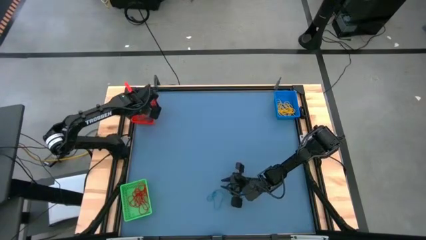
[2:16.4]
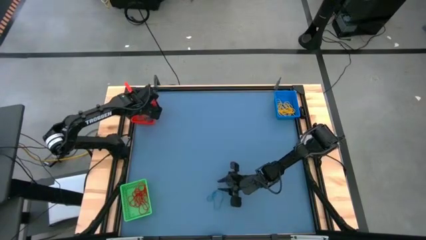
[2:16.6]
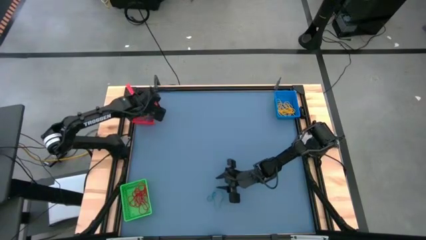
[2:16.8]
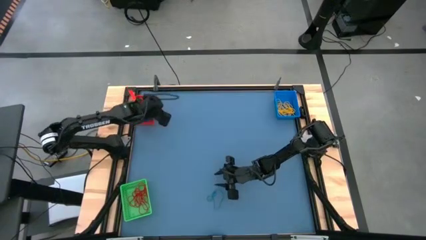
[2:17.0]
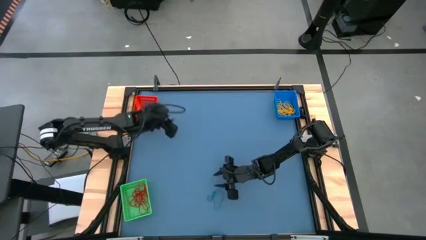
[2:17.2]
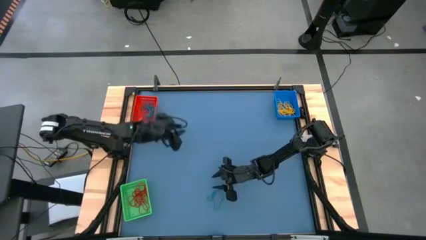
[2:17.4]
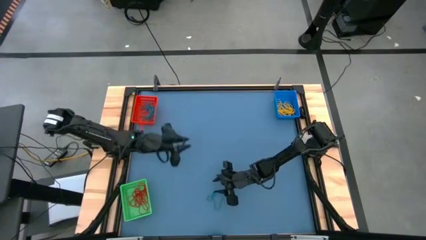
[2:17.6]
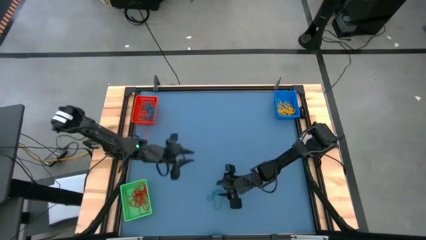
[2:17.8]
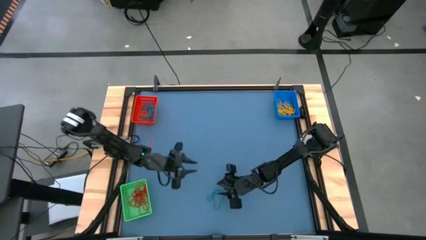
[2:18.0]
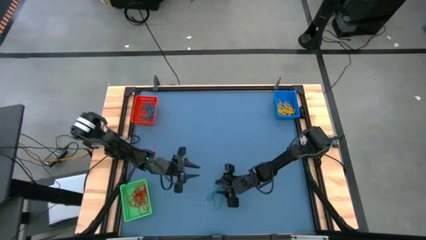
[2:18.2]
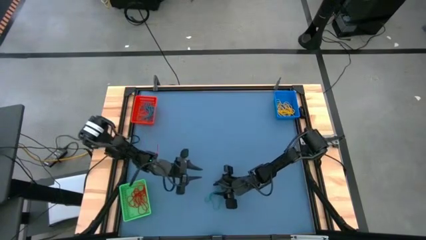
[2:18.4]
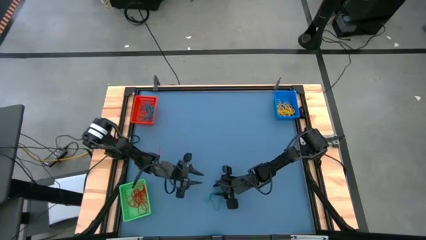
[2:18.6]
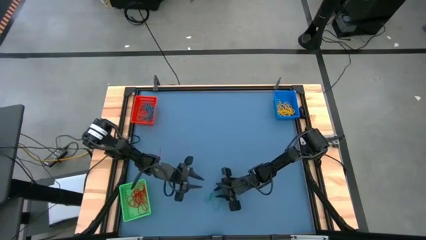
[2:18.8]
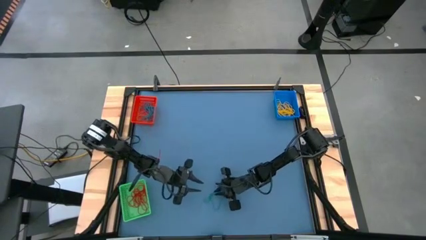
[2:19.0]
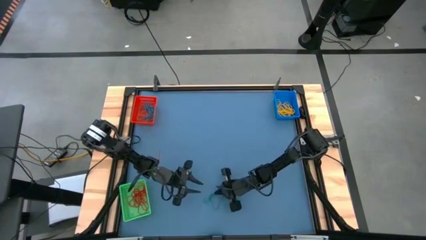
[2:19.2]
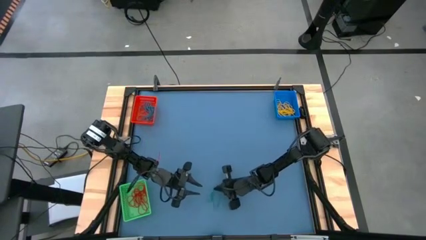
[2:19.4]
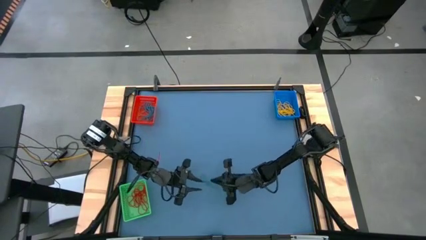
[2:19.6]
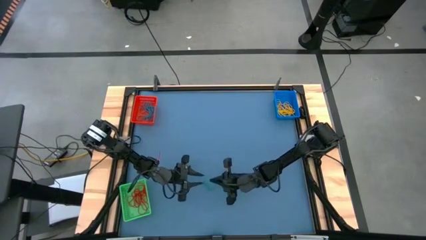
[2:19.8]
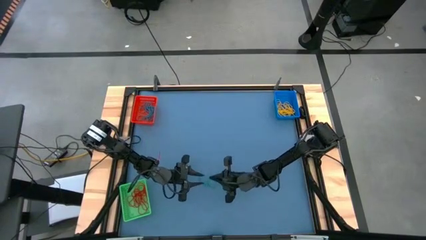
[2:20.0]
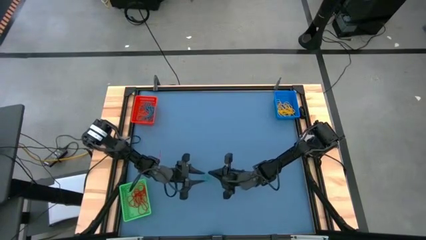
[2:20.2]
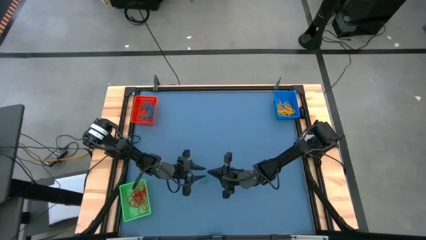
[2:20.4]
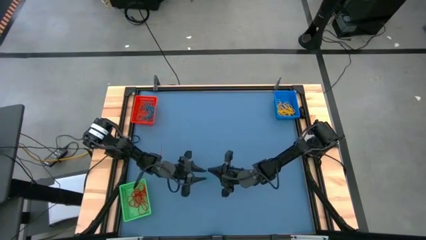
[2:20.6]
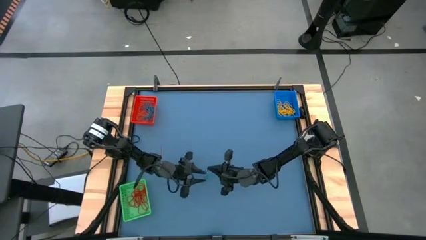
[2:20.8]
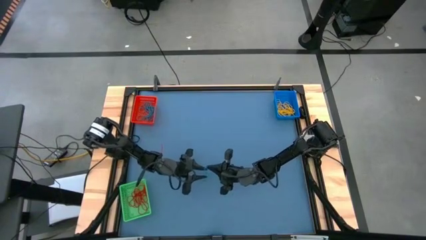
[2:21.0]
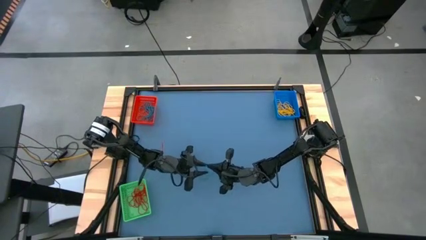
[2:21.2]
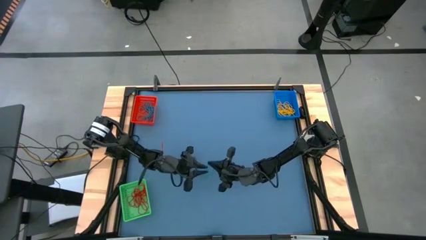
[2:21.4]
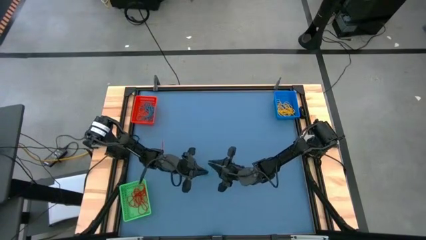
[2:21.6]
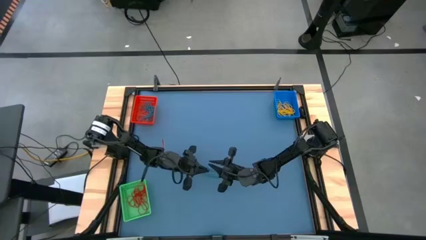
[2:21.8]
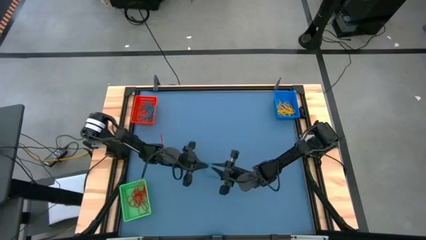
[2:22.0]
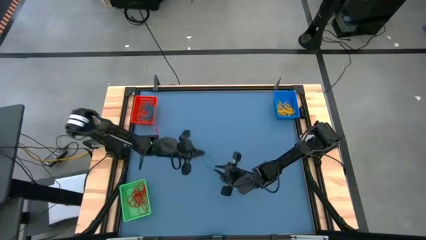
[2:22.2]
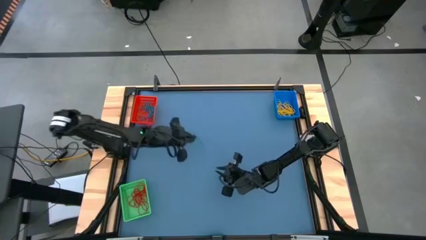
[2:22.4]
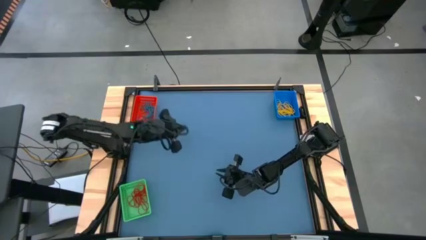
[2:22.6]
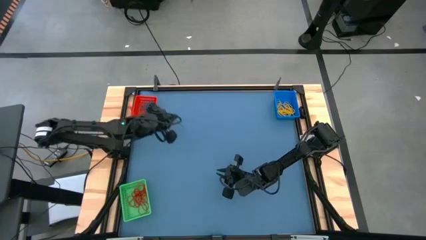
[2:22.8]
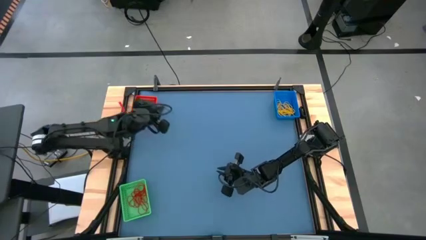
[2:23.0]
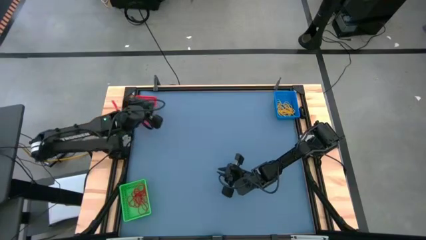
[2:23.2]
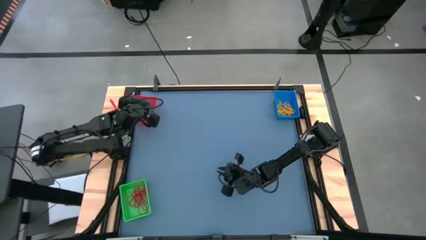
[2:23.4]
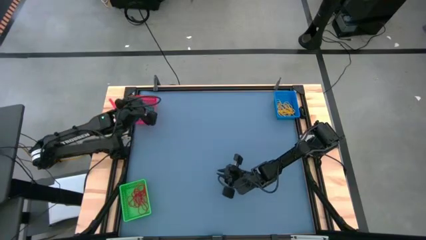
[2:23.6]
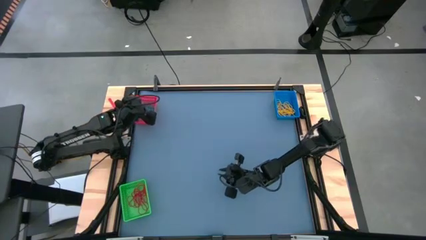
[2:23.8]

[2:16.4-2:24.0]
Task: Sort rubber bands into baskets
Put the blue rubber band into the red basket

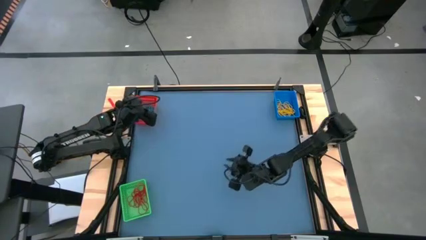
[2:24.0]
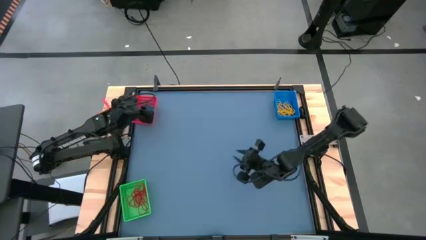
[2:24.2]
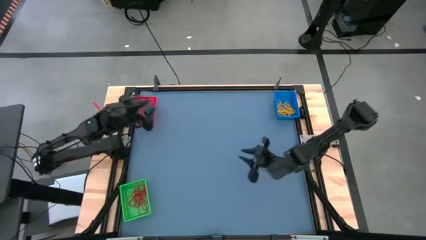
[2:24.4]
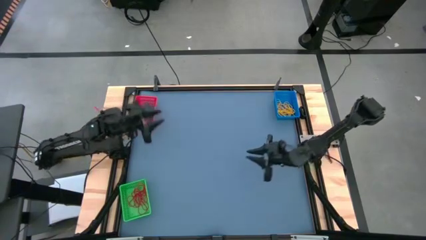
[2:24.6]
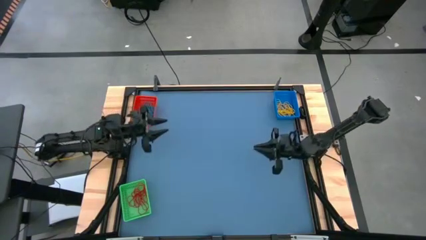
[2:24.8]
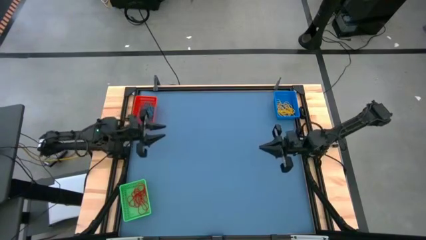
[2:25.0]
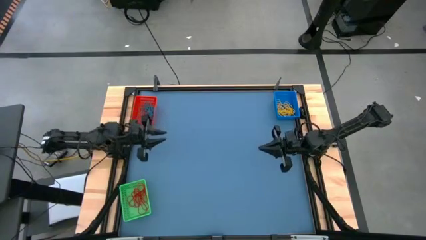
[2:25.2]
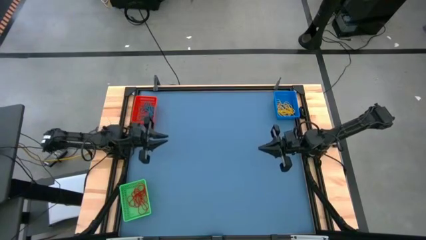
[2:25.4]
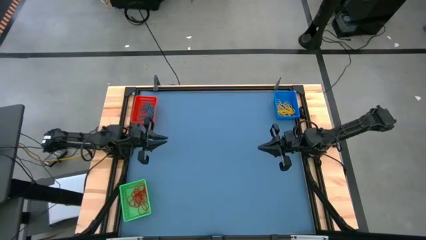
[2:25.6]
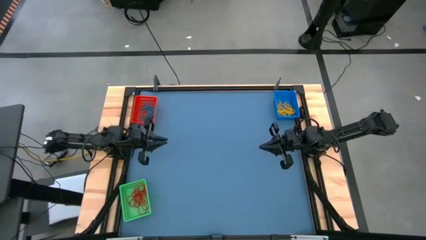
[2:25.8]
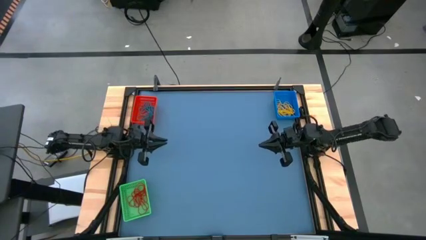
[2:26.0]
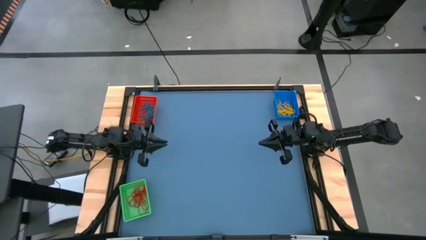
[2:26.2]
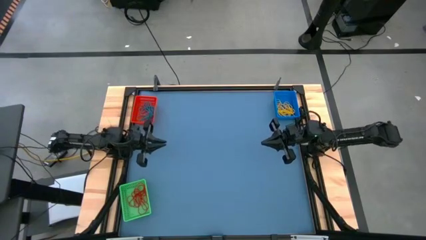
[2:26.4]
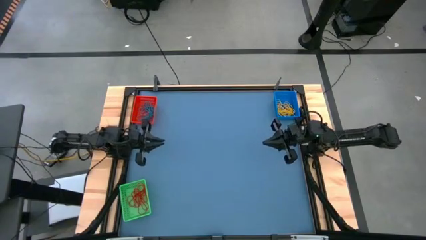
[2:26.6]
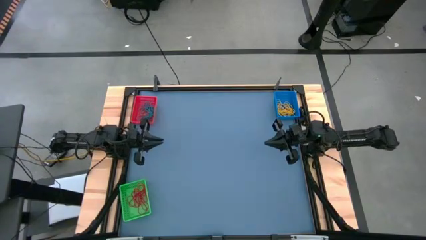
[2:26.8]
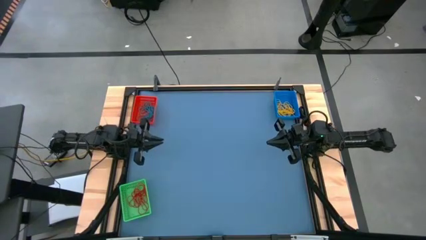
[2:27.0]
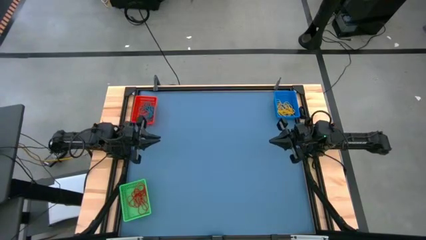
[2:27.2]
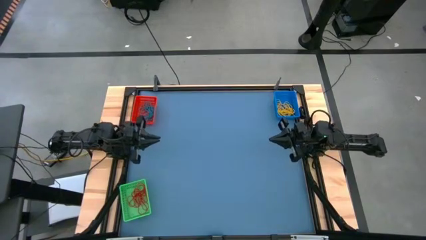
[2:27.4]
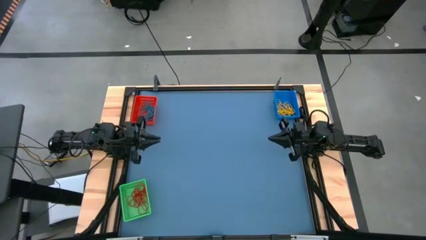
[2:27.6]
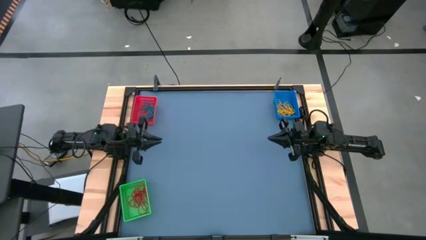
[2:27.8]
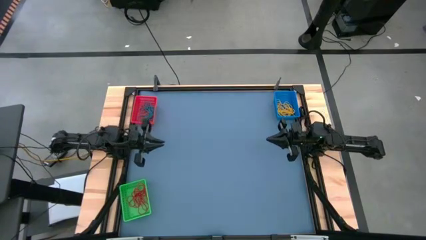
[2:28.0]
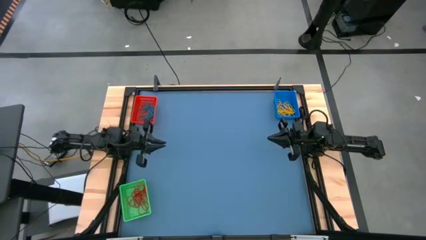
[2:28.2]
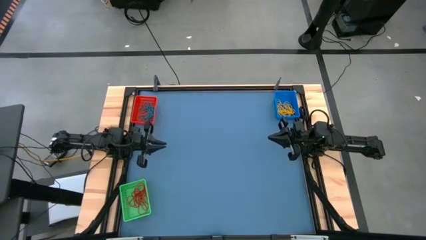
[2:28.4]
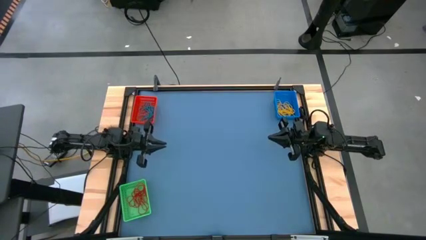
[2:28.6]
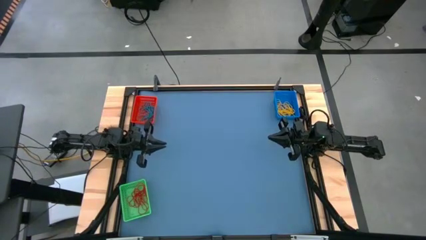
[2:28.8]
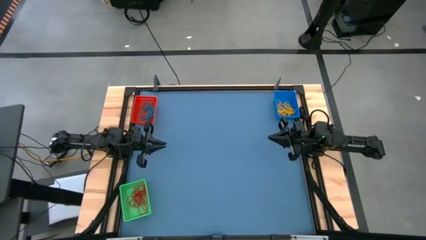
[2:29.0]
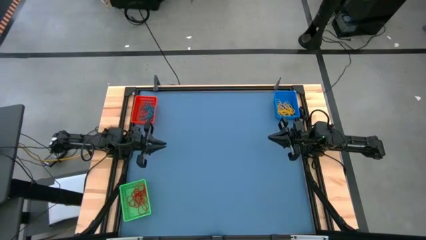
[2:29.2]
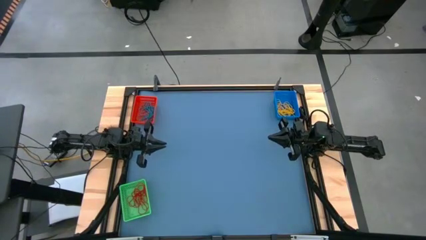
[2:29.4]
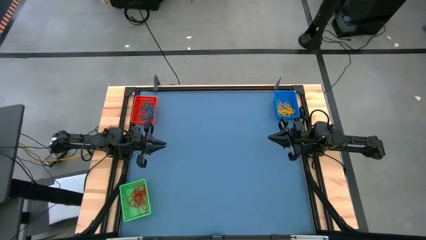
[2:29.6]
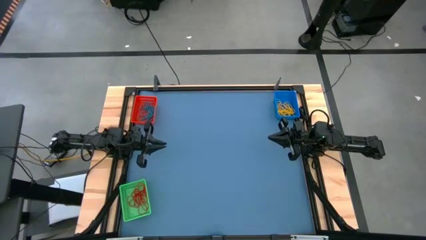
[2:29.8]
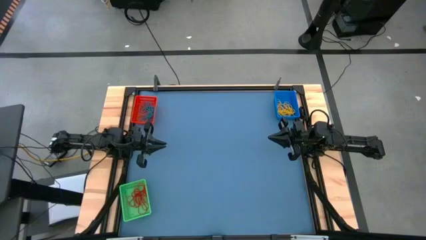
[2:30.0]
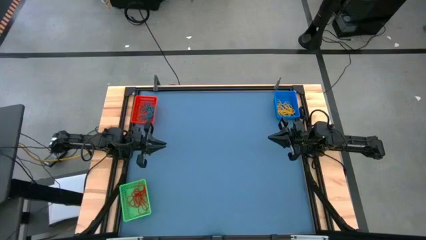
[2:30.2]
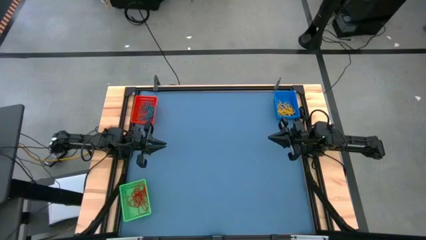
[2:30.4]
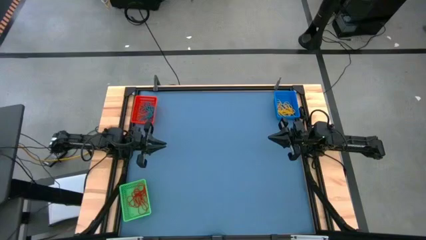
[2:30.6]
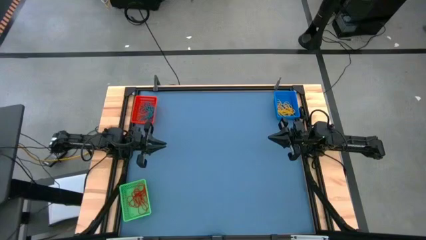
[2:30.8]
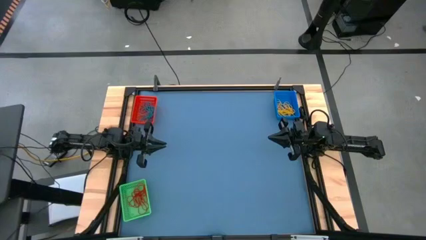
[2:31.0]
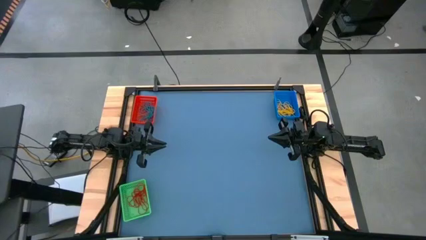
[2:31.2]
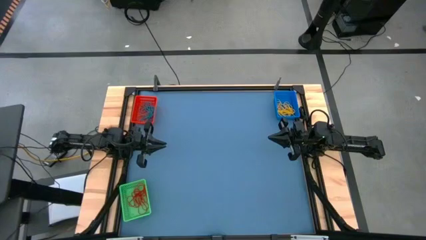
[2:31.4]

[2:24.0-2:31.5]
Return to Home Position
